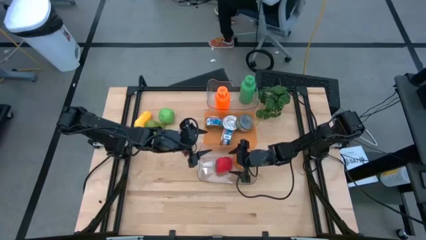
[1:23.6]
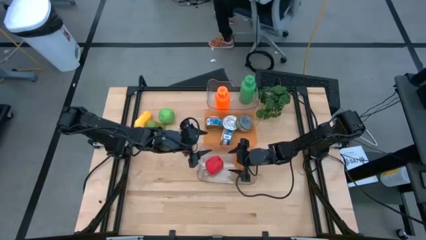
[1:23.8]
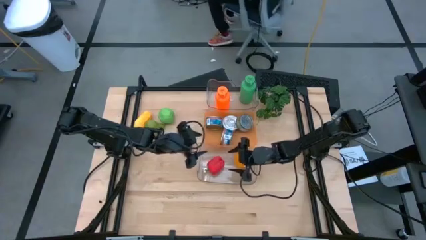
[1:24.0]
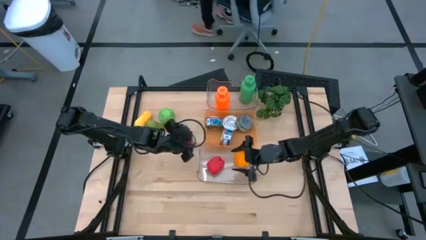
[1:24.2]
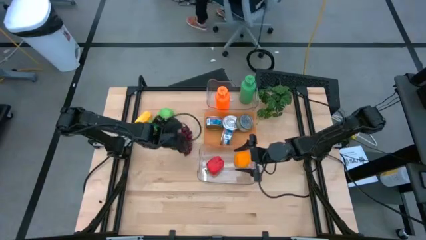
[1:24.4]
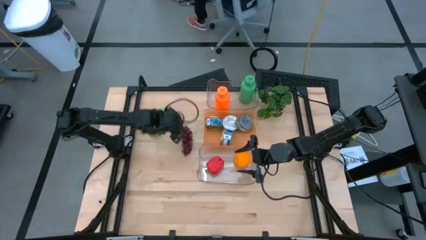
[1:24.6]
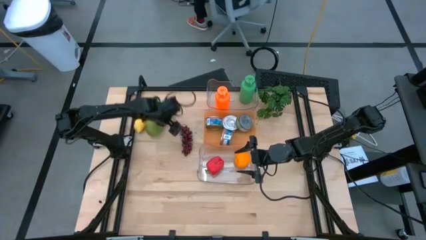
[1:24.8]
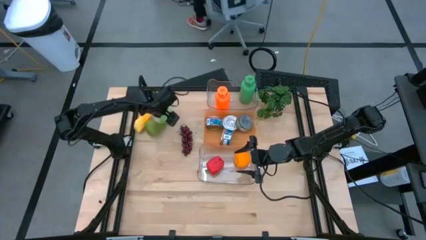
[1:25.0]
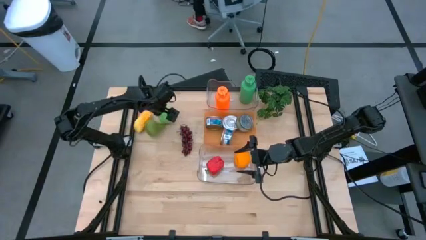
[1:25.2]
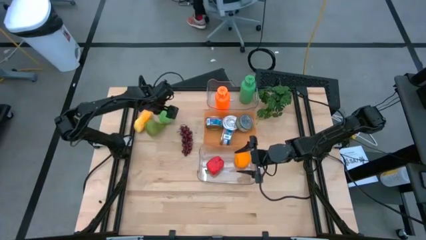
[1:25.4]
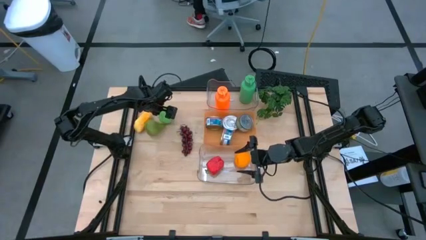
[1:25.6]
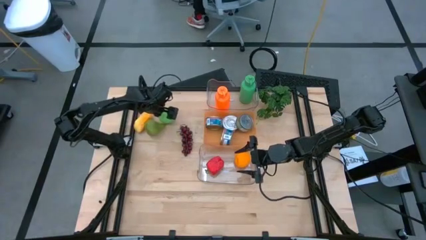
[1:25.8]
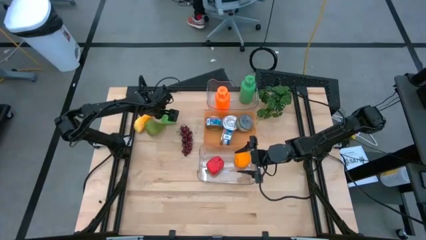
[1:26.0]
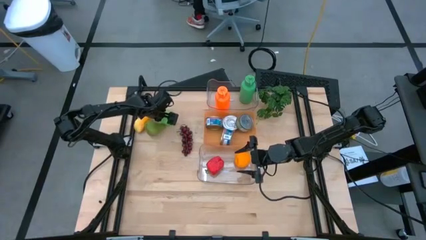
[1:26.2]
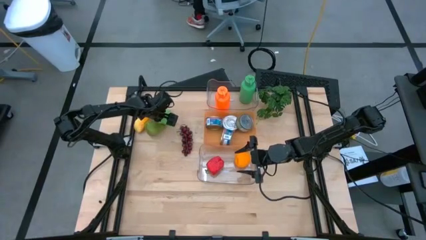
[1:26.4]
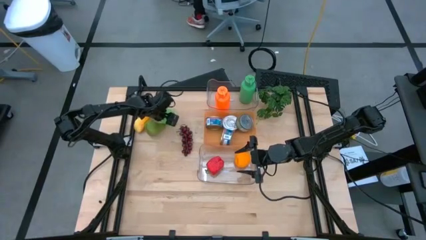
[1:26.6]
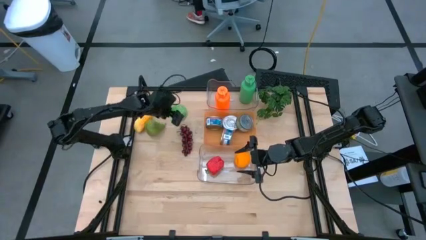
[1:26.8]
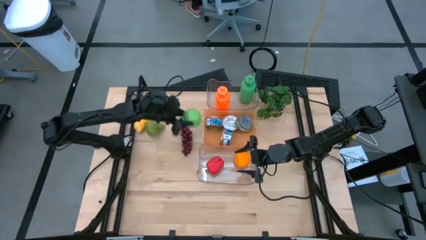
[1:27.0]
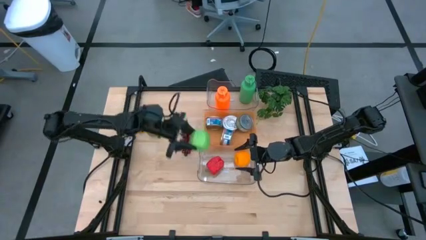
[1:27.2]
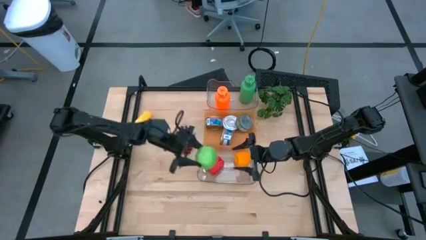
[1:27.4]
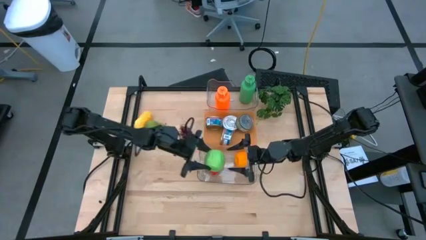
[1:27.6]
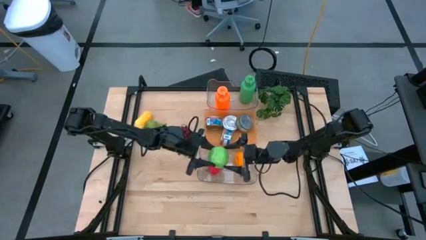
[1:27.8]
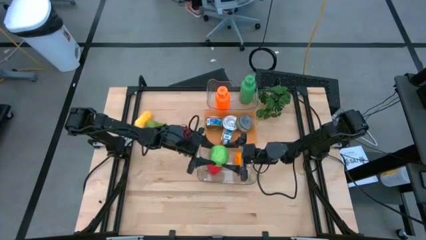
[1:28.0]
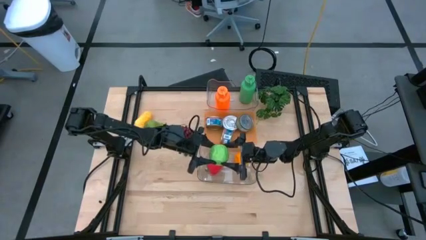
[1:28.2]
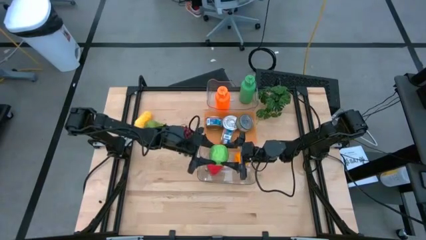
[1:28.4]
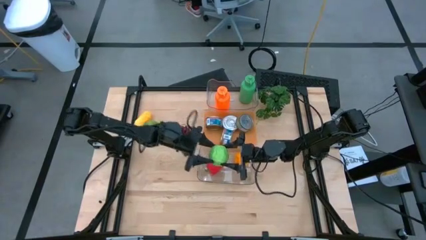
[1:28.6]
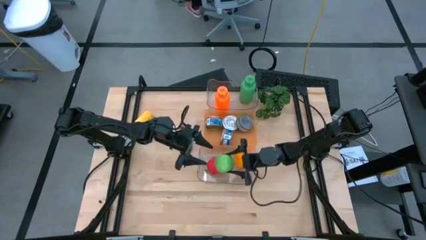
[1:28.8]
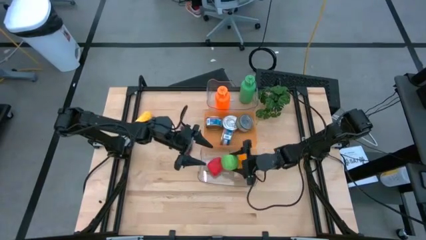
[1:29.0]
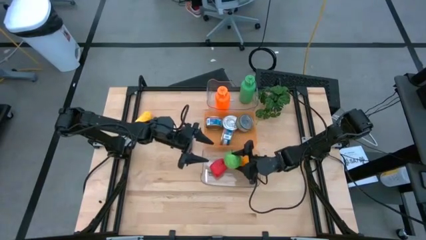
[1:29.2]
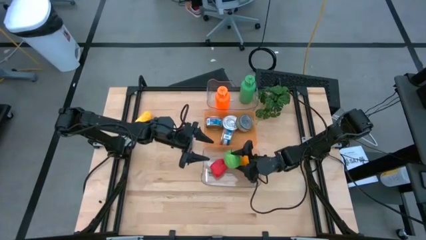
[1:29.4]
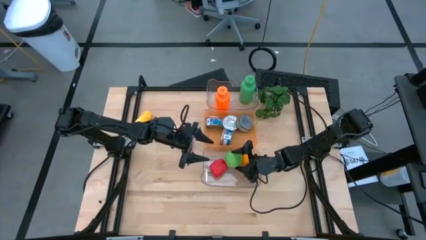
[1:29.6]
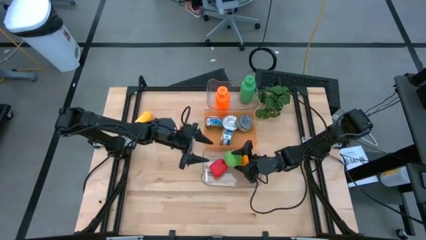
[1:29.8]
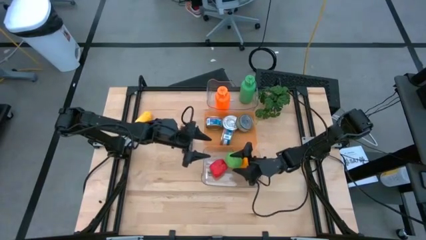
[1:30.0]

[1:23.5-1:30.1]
Task: Pick & Place Food Item
Put the green apple into the bottom transparent bin

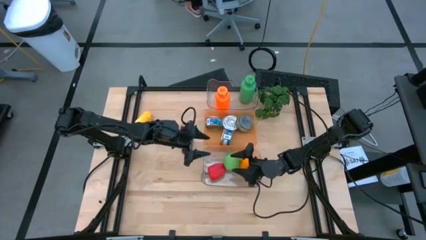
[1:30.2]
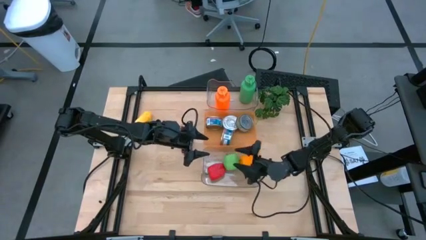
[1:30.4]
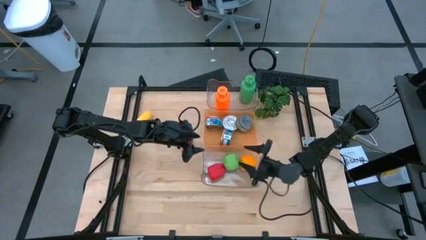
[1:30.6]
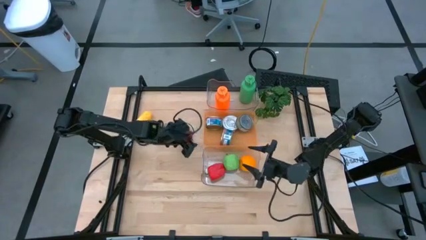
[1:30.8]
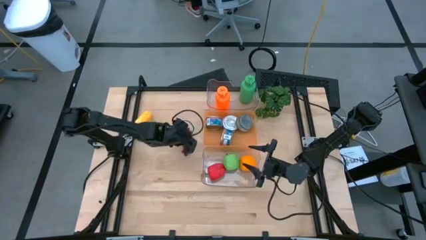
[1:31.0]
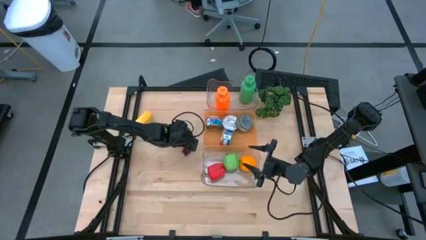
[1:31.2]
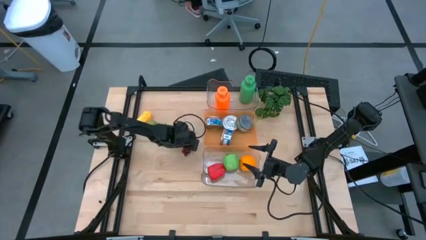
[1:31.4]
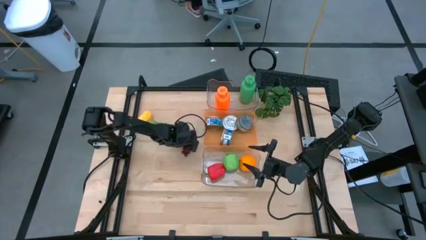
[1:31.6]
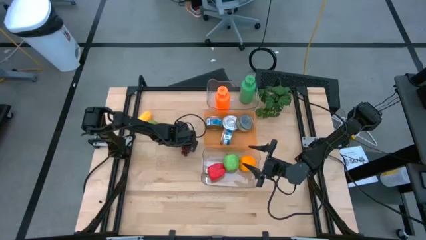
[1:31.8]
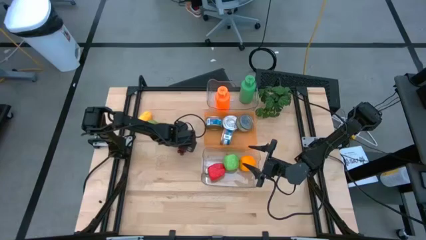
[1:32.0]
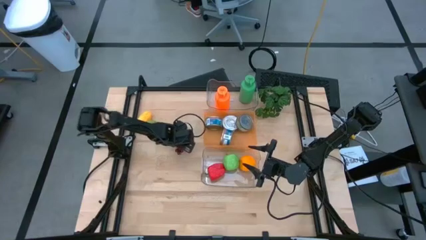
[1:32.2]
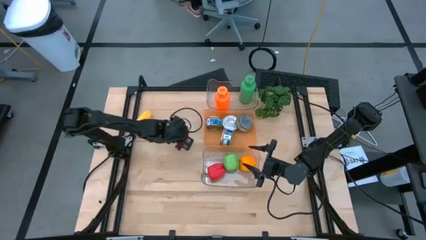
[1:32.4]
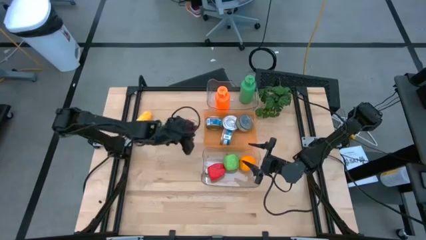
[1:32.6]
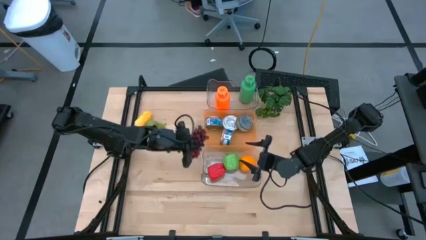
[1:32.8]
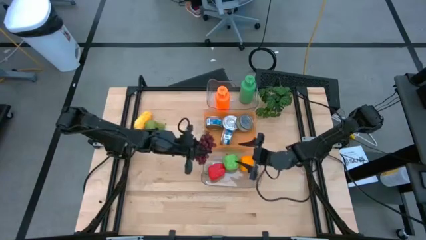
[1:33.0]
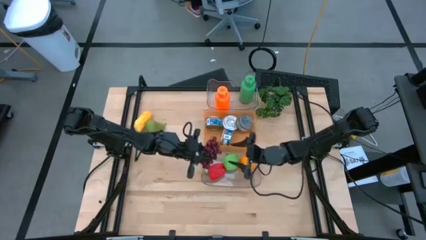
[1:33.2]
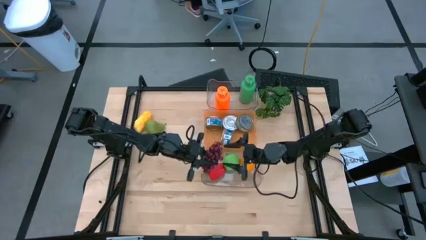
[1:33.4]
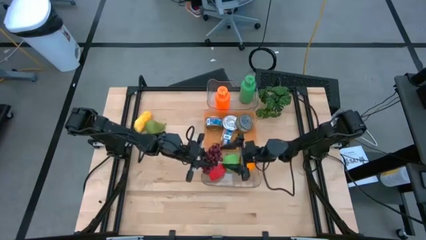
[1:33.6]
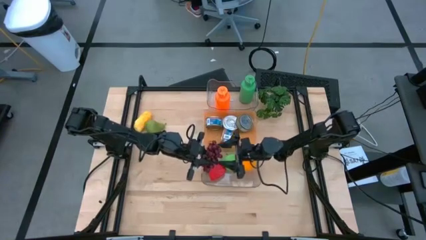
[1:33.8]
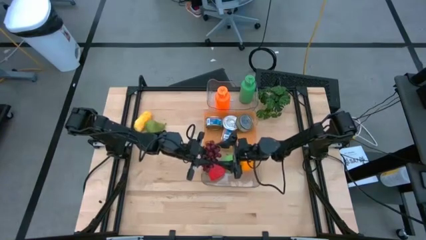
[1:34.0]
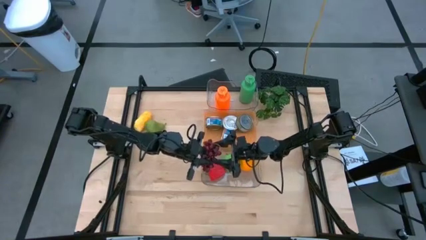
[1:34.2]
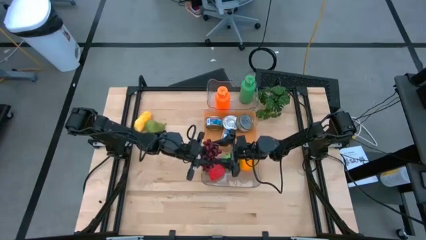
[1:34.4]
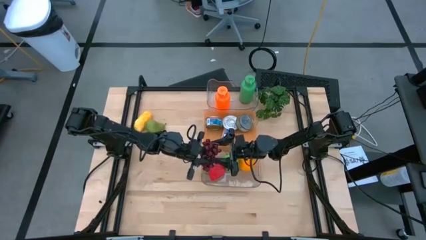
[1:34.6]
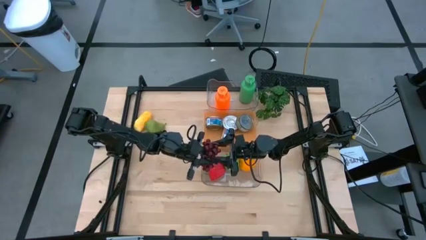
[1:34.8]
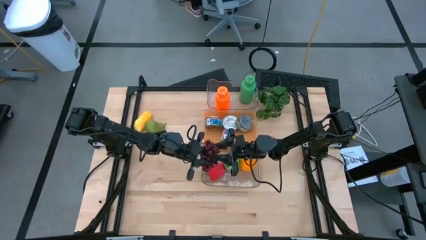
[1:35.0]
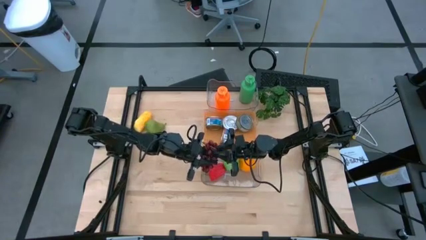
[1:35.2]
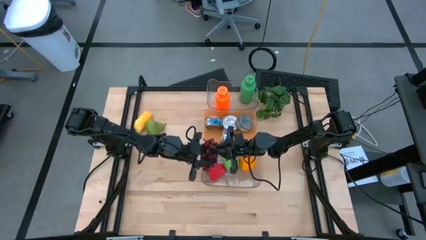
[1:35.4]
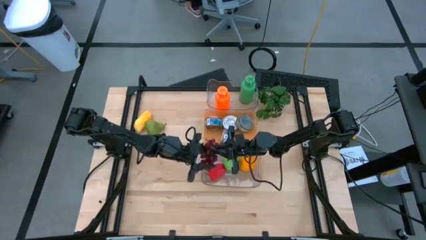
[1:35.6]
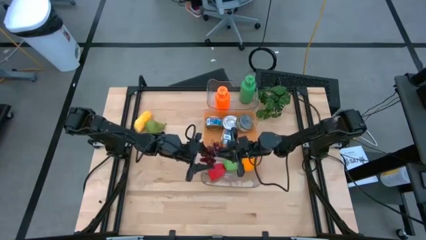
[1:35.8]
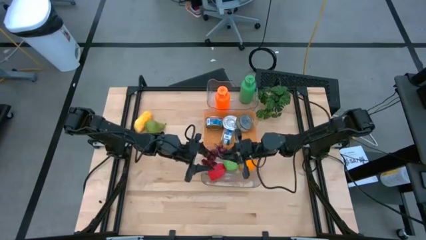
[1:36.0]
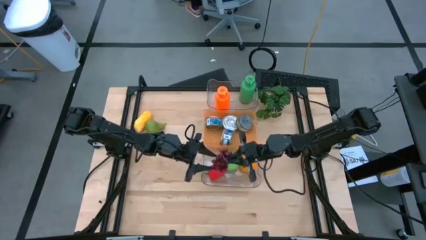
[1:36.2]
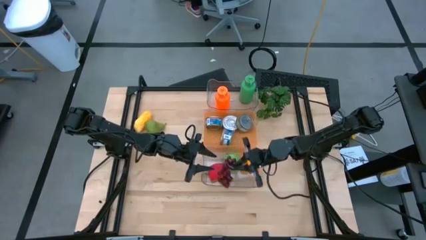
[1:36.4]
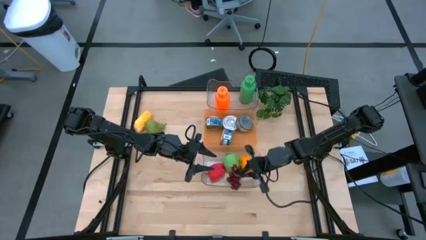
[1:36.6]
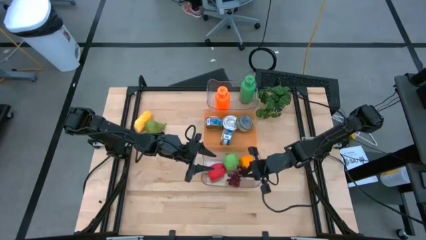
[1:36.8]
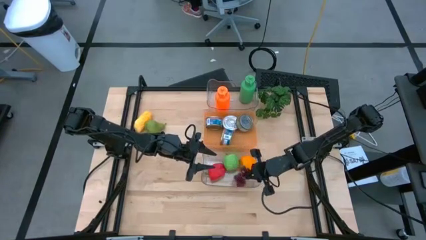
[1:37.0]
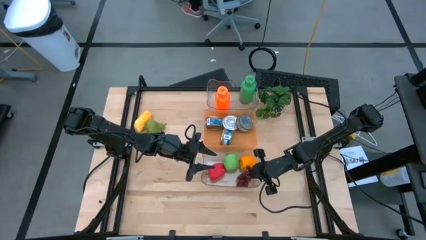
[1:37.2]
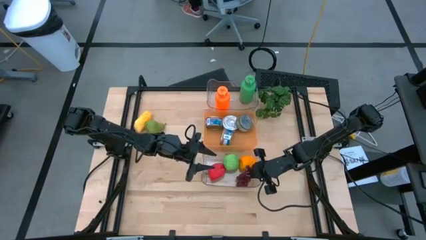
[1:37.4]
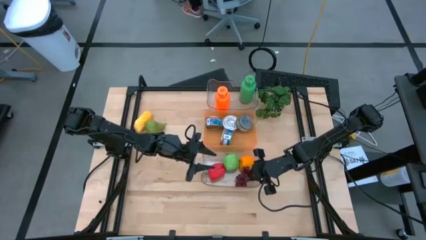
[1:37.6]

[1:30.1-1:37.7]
Put the red grapes into the bottom transparent bin
